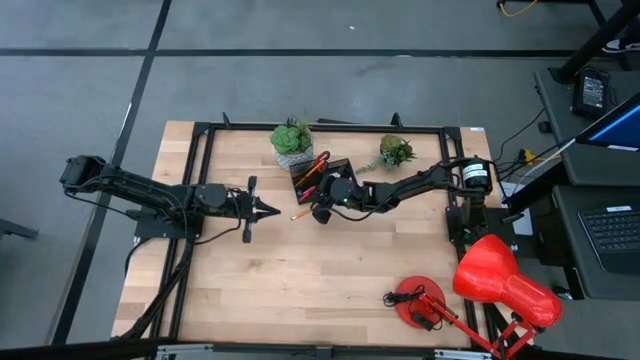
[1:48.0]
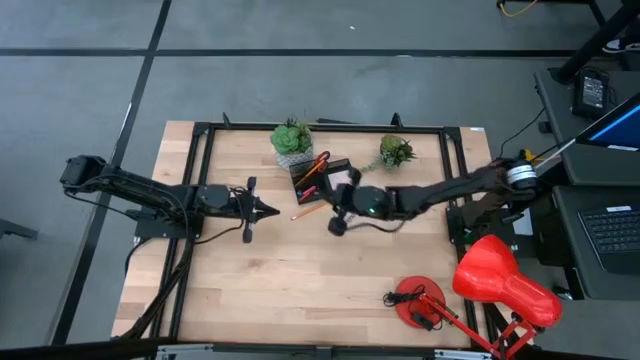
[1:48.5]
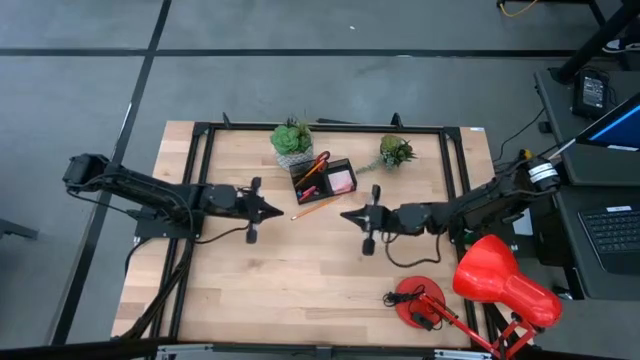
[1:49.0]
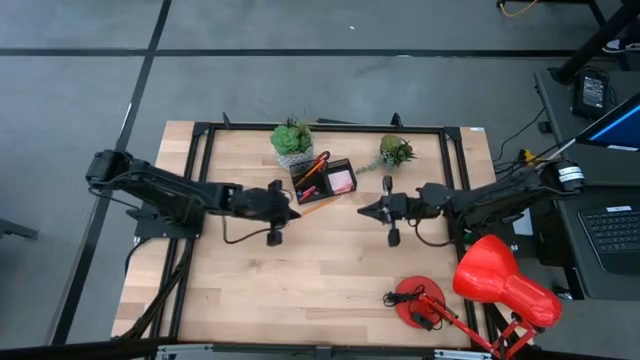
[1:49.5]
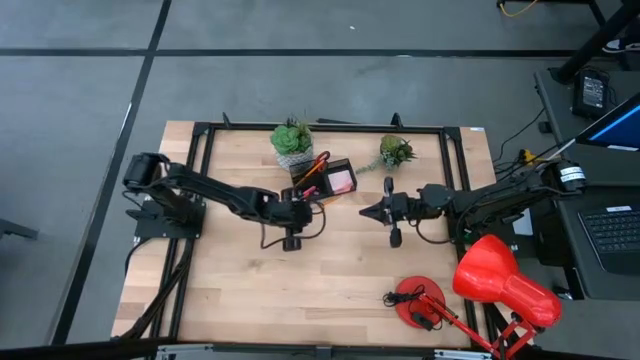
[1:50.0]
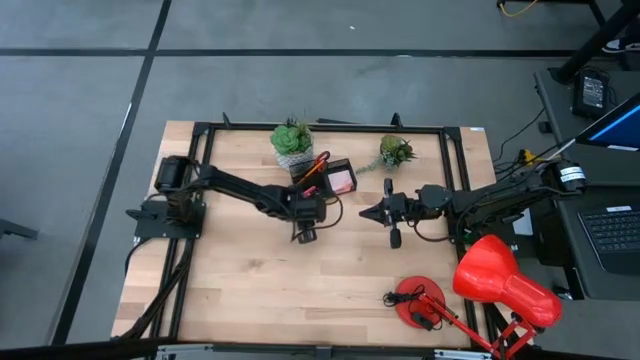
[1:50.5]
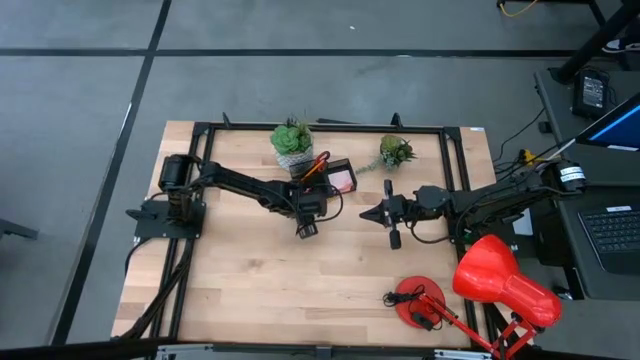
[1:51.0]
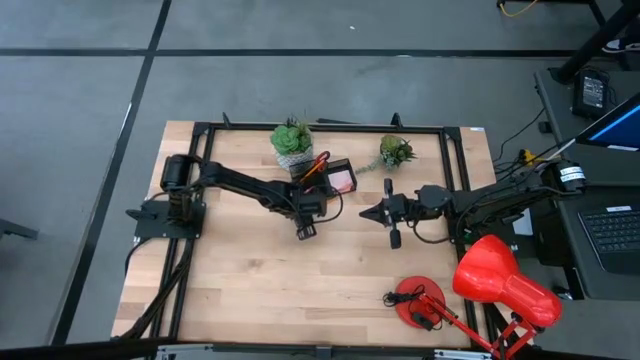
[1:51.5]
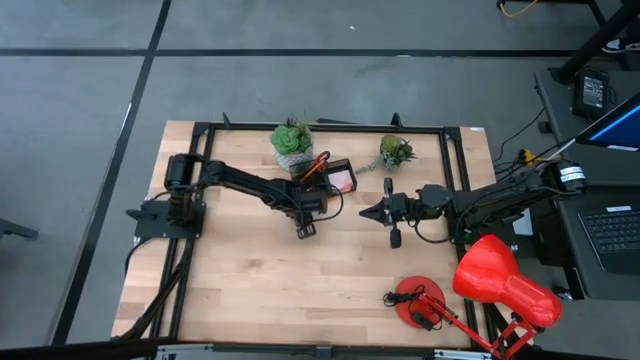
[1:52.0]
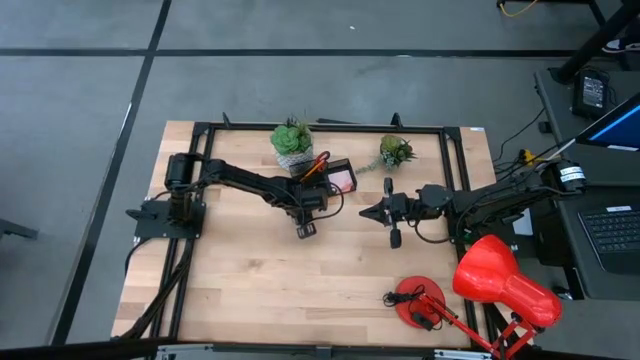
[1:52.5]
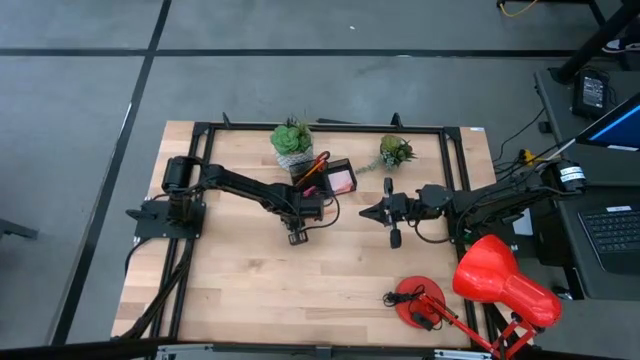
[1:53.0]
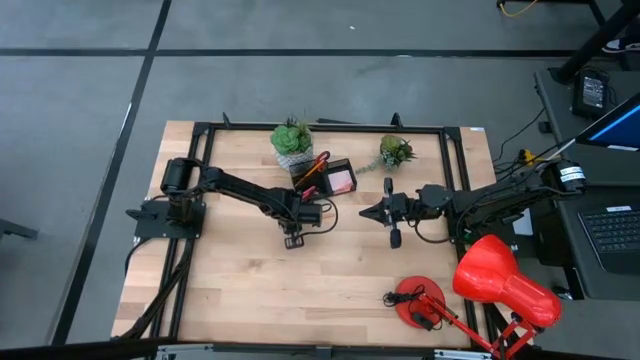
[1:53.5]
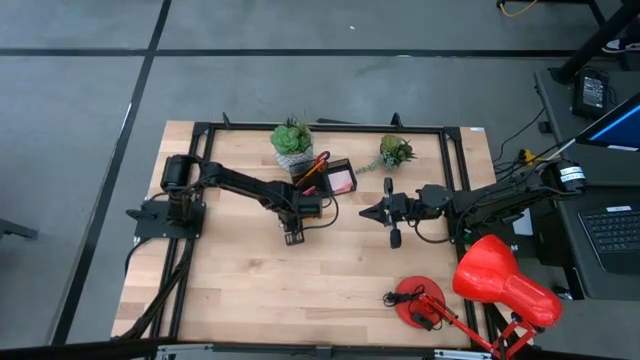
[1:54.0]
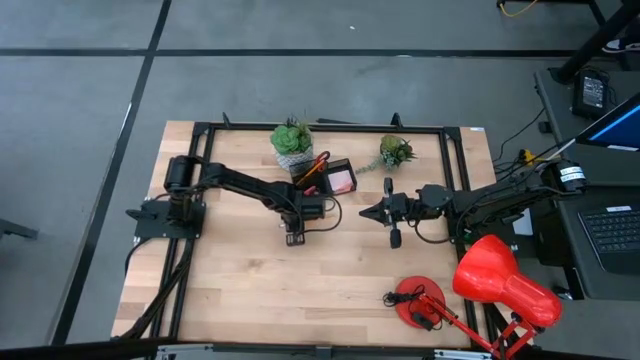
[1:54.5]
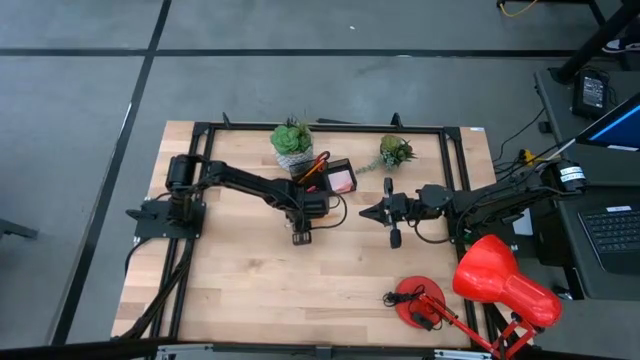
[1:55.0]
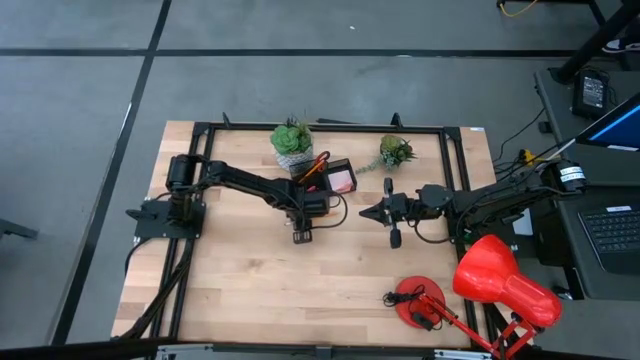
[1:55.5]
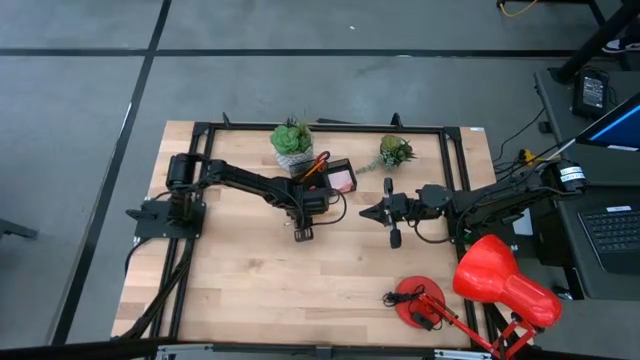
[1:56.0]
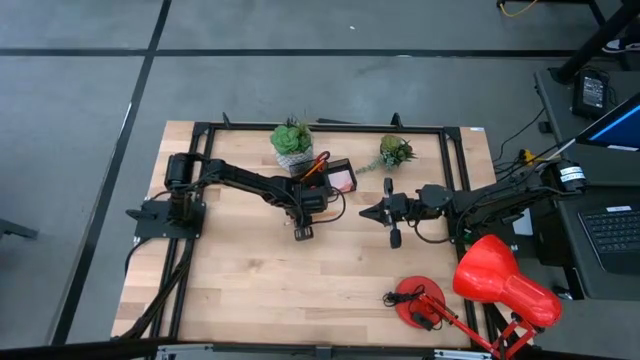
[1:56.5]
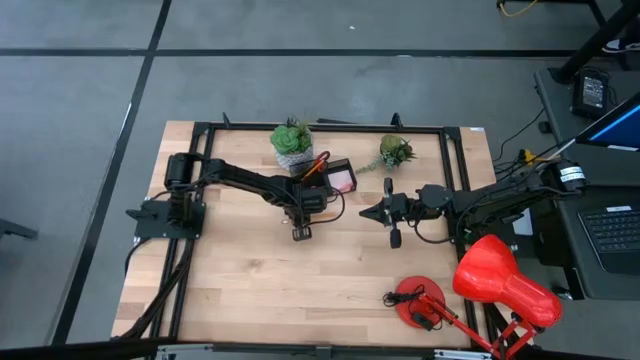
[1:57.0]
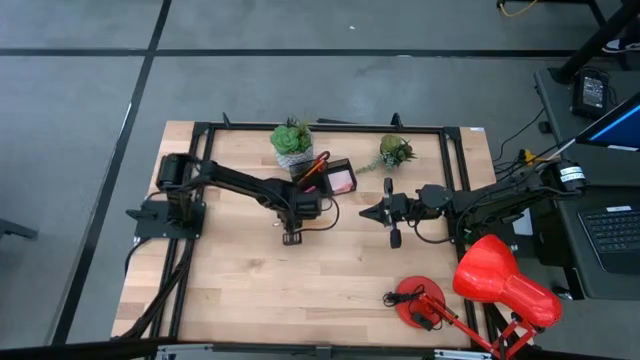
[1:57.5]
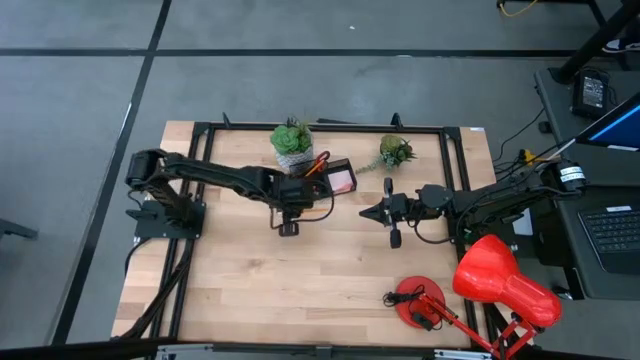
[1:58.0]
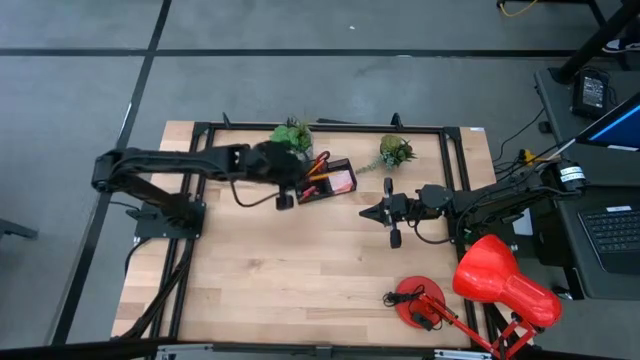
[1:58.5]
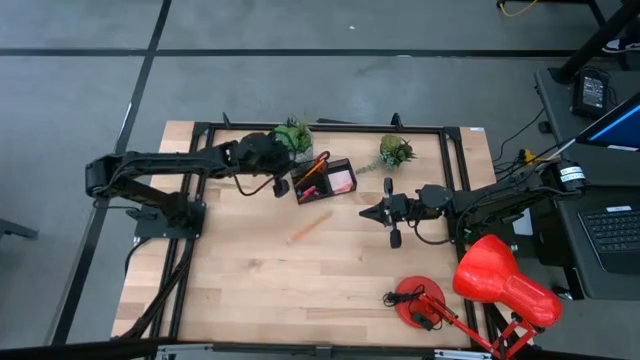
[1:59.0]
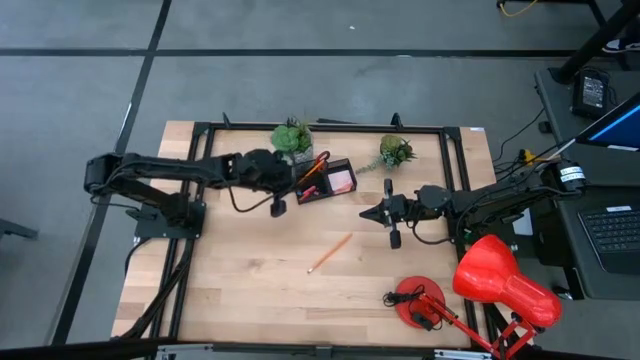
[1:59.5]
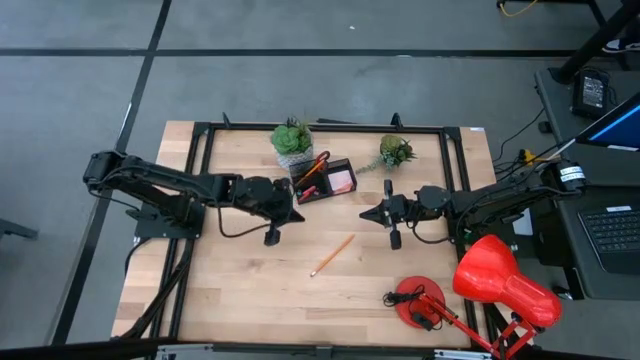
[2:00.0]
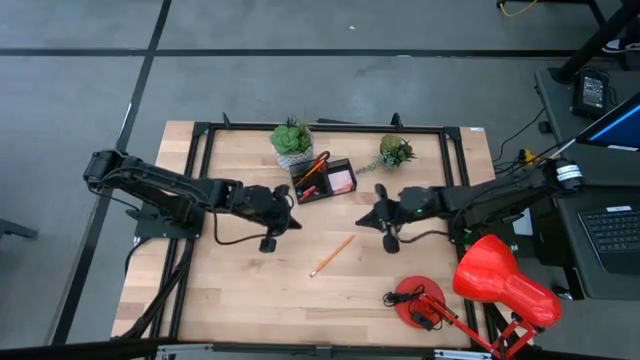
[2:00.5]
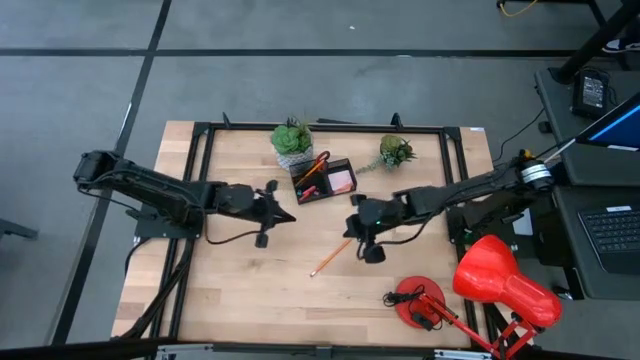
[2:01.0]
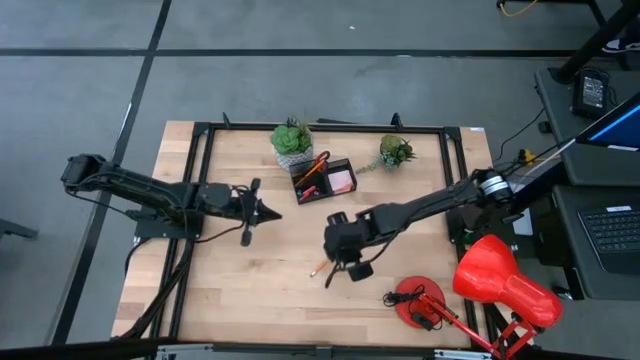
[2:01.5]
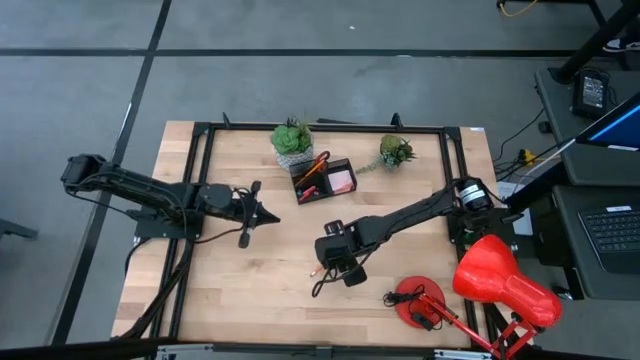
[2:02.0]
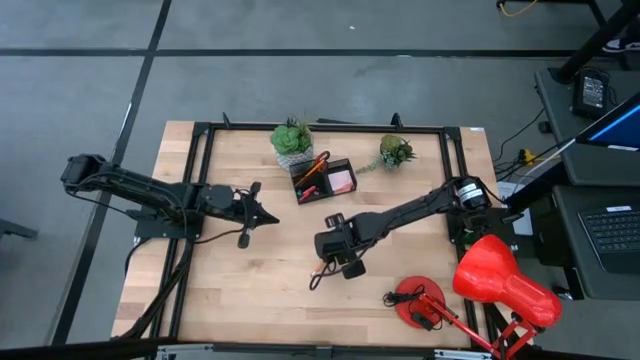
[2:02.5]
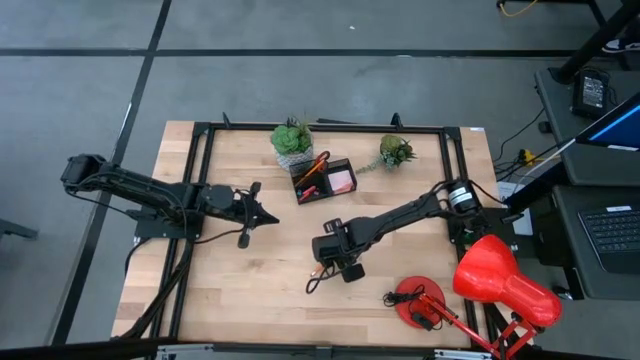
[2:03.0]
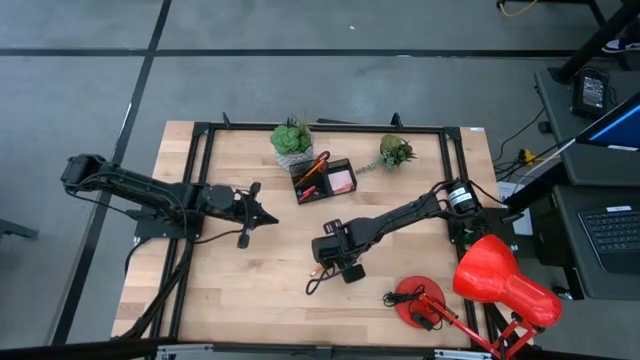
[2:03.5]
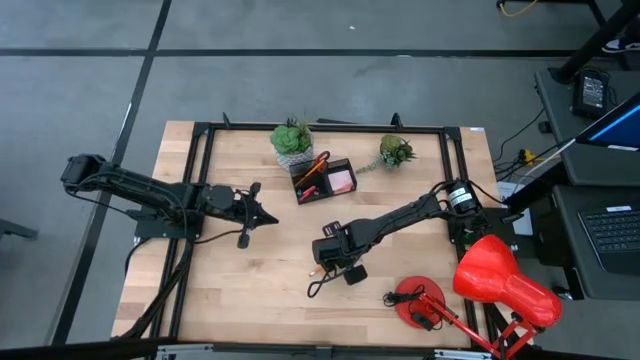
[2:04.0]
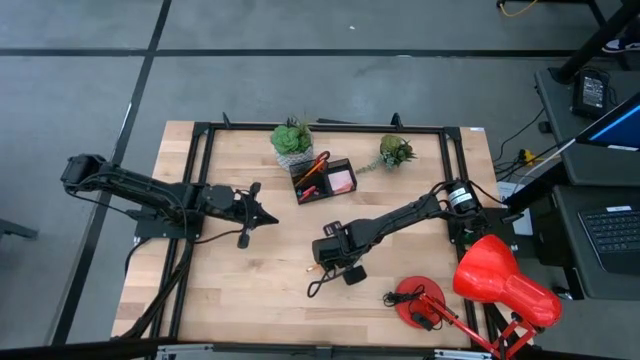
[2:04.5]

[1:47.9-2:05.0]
Task: Pick and place office supplies into organizer
Put the orange pencil into the black desk organizer

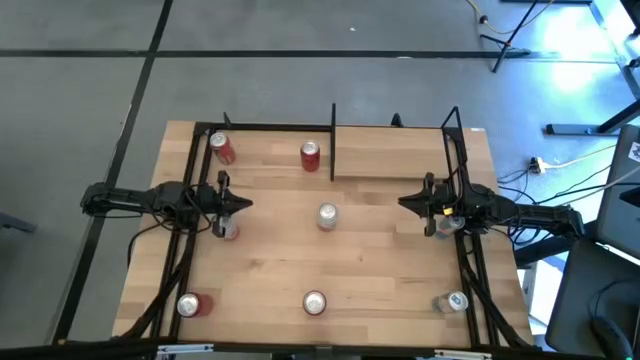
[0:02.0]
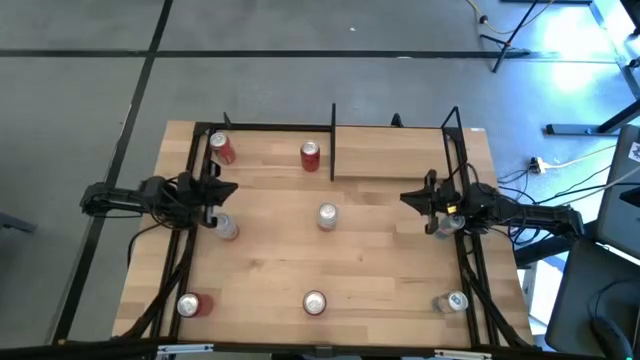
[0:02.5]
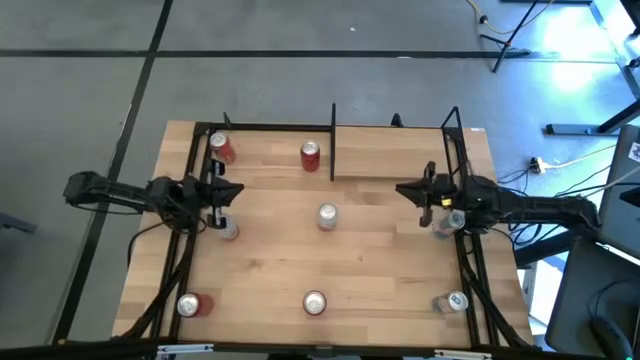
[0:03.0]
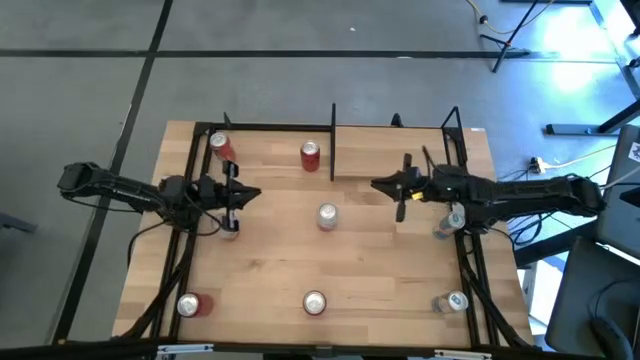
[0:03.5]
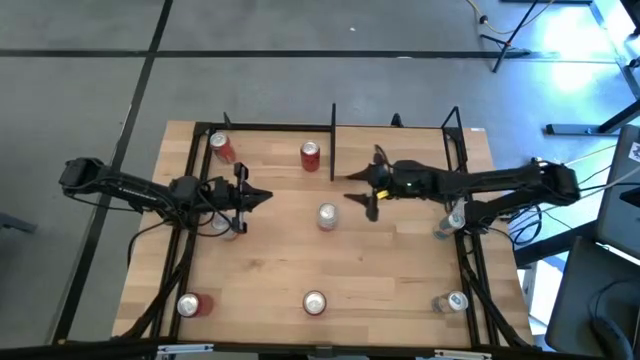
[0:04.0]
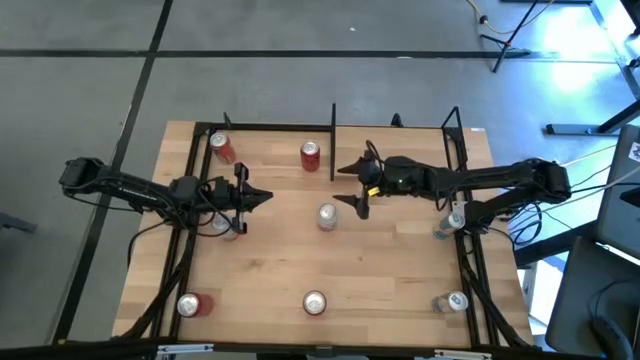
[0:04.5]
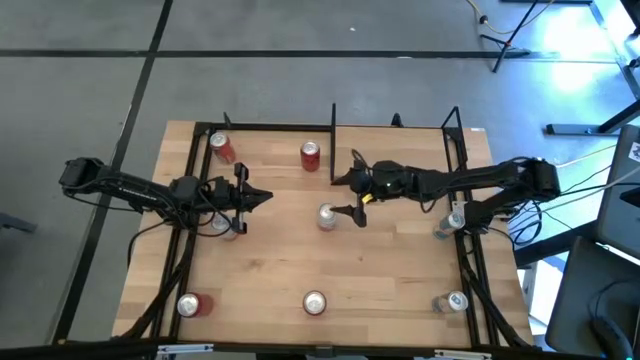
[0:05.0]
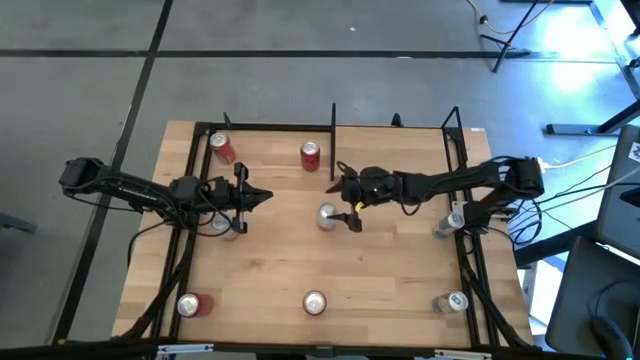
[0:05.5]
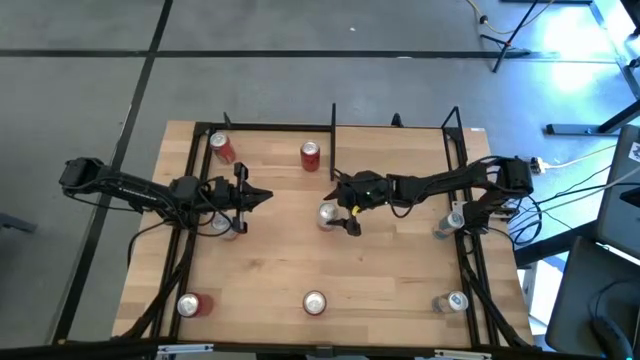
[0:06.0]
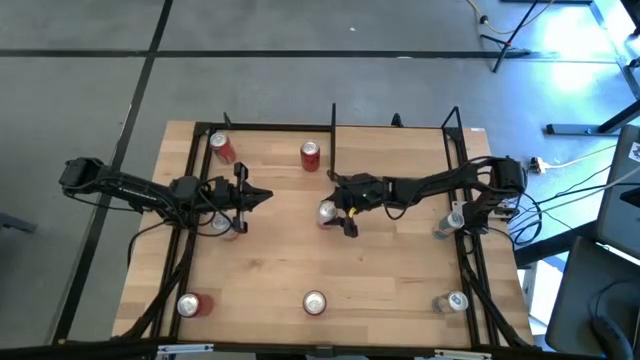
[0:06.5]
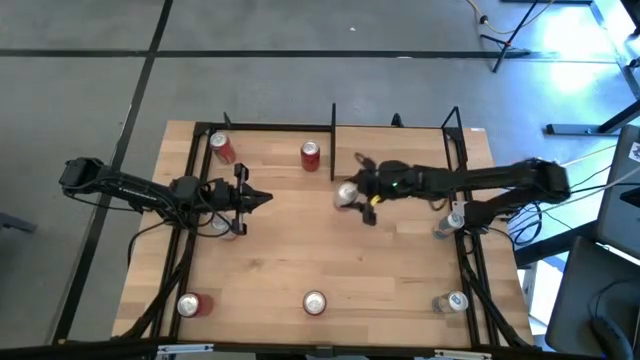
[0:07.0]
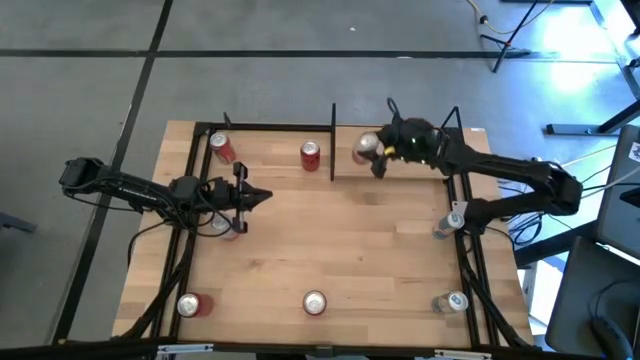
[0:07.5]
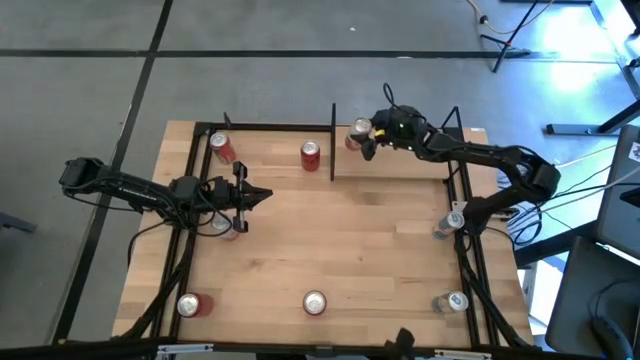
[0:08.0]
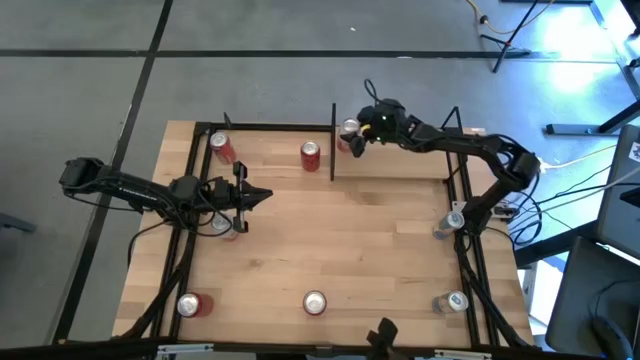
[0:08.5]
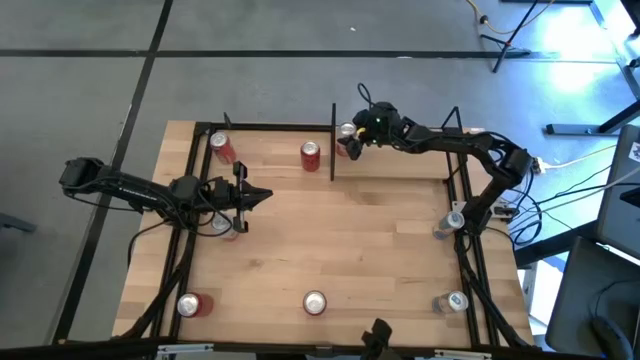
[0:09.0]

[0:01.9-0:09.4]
Task: Place canned beverage on shelf
Put the right pink white soda can on the shelf
